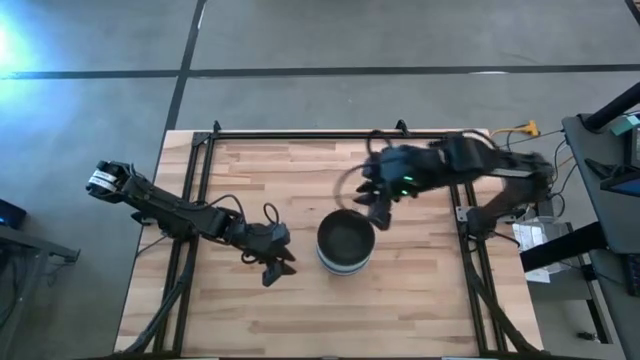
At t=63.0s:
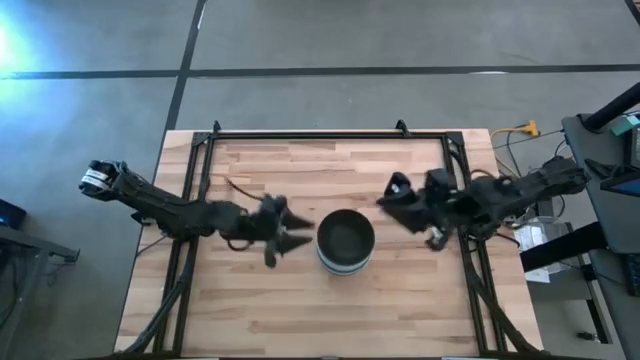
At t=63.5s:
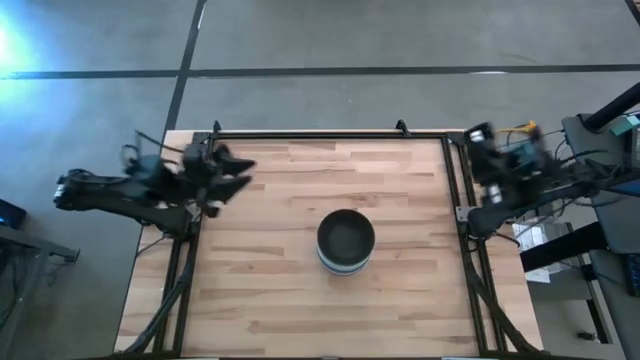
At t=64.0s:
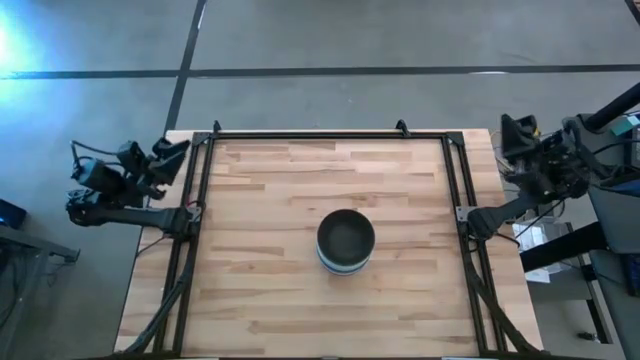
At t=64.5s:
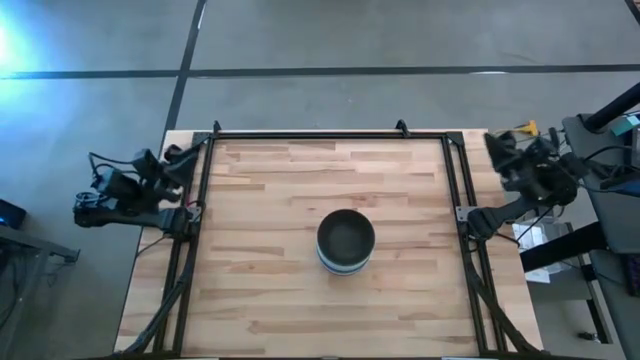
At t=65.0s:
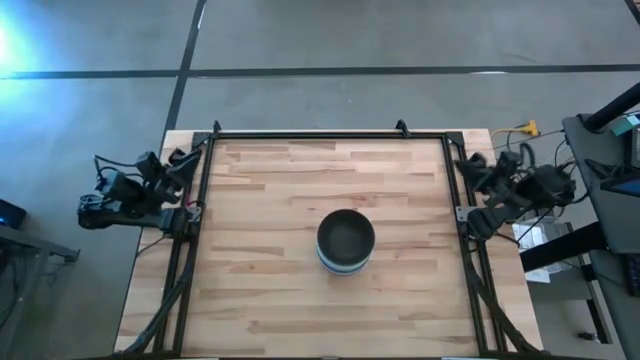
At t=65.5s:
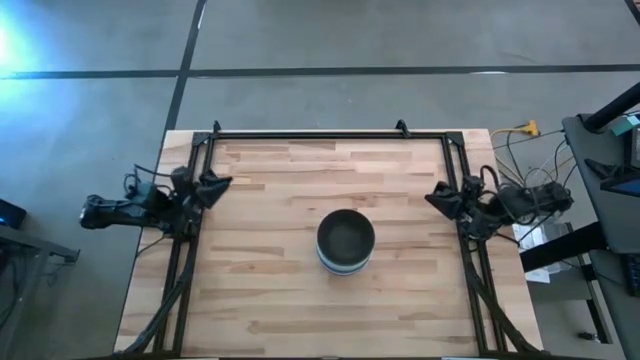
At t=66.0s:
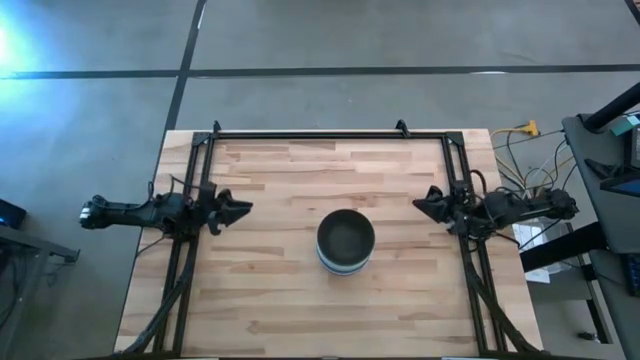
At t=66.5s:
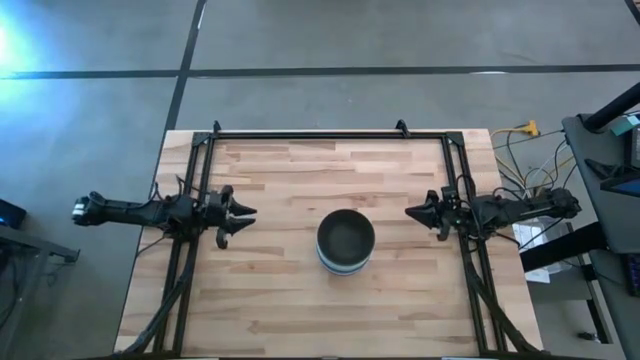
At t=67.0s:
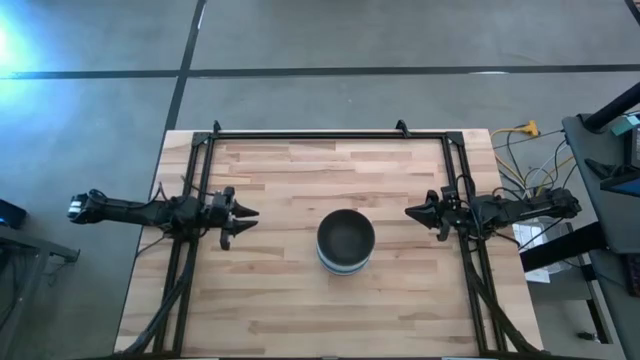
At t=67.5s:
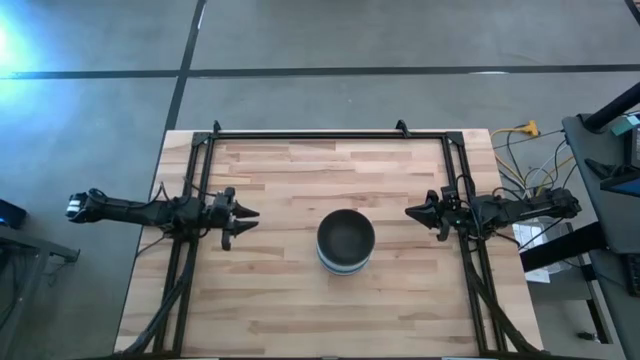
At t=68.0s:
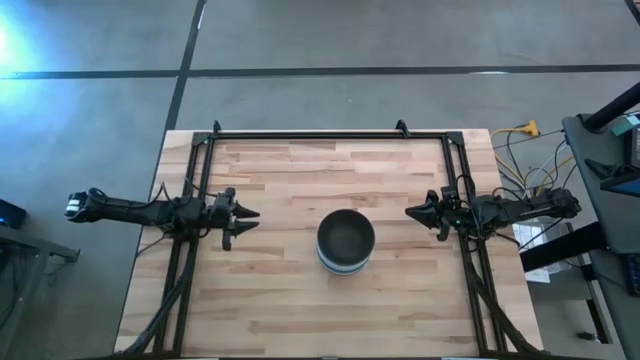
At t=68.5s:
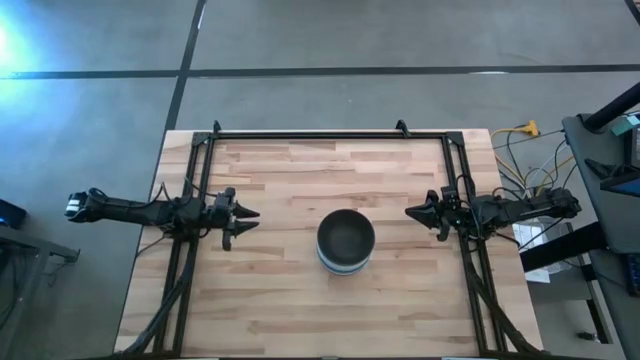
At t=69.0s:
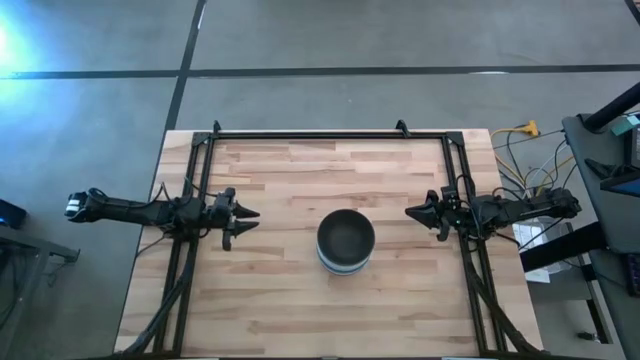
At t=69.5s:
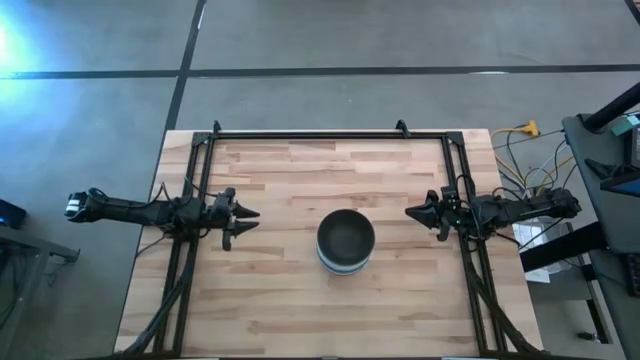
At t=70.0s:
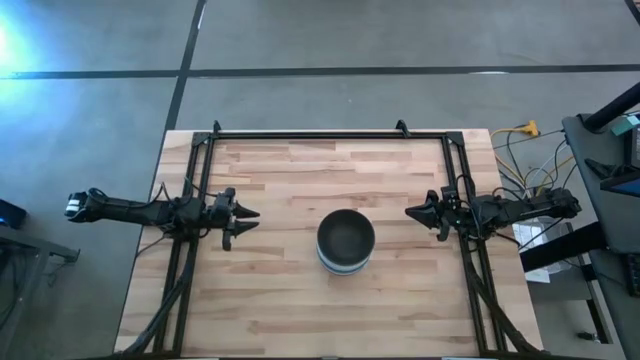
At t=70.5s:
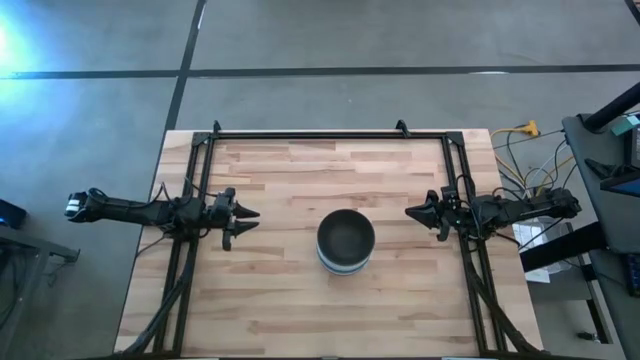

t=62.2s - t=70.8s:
Task: Nest bowls inside each other
Return to Home Position

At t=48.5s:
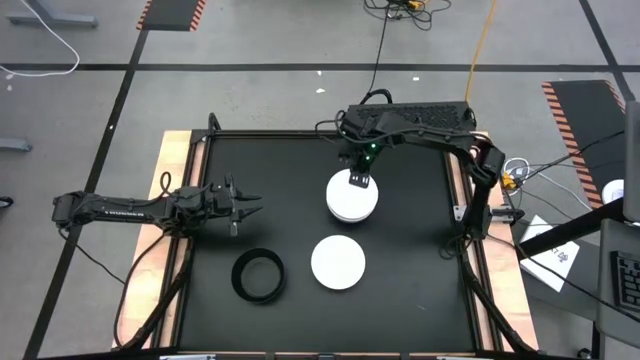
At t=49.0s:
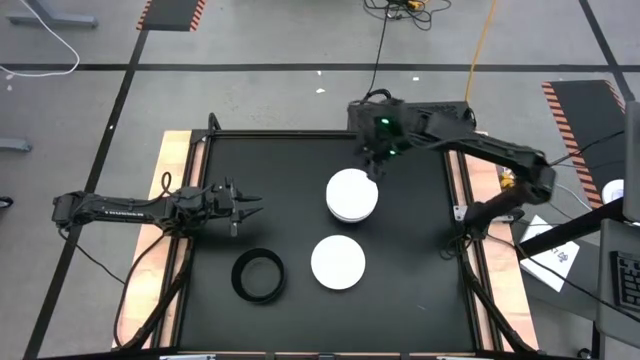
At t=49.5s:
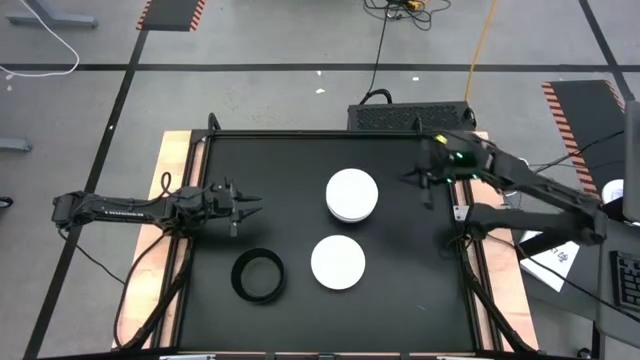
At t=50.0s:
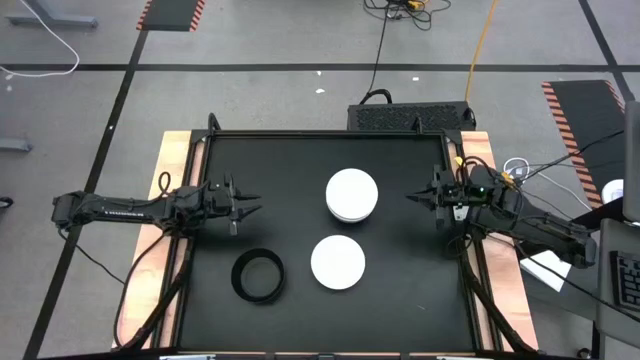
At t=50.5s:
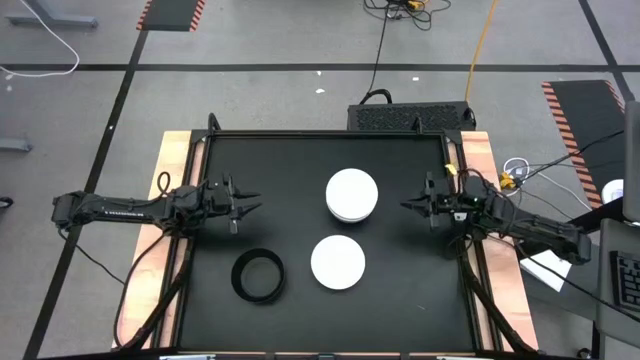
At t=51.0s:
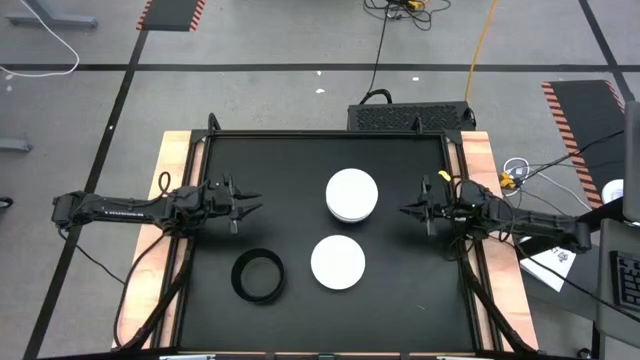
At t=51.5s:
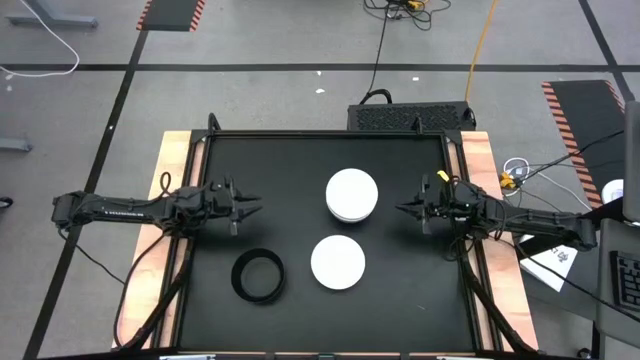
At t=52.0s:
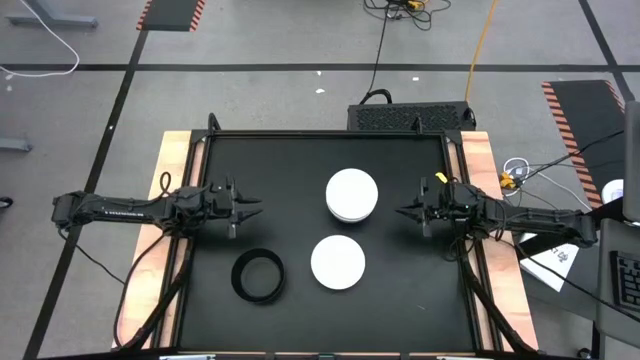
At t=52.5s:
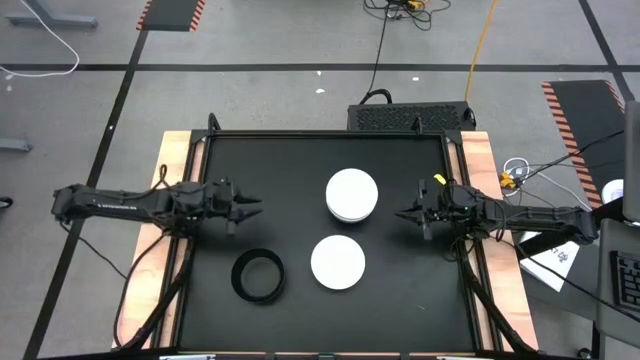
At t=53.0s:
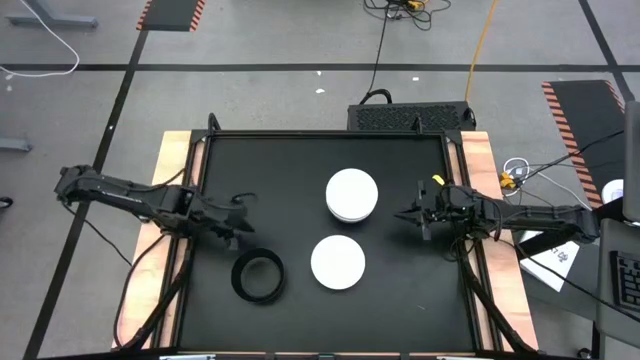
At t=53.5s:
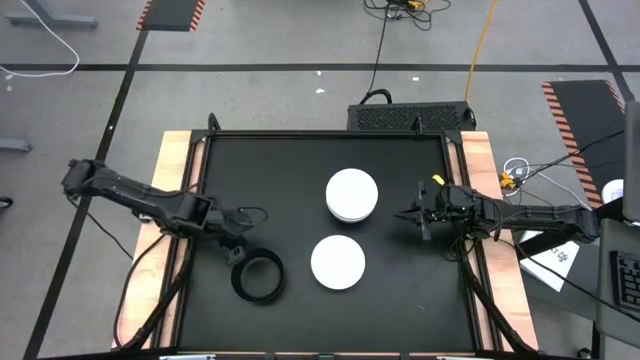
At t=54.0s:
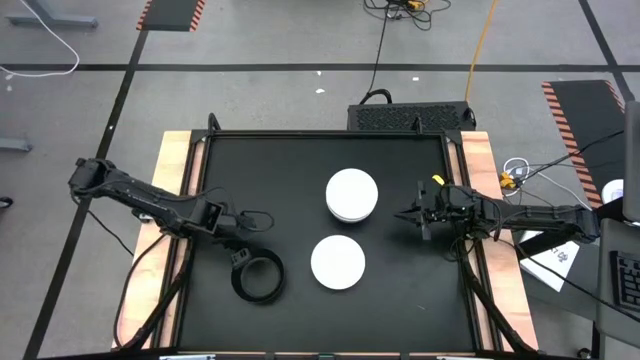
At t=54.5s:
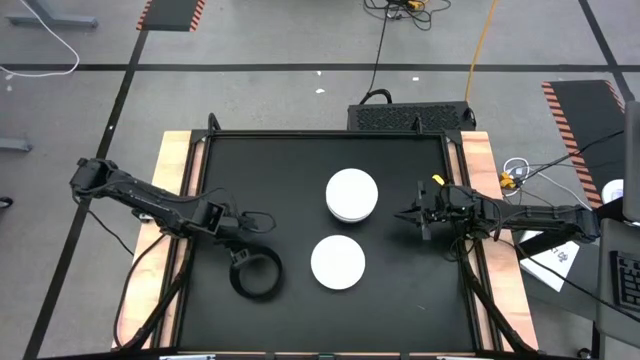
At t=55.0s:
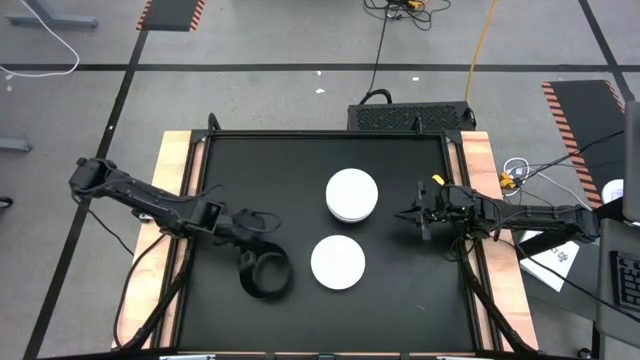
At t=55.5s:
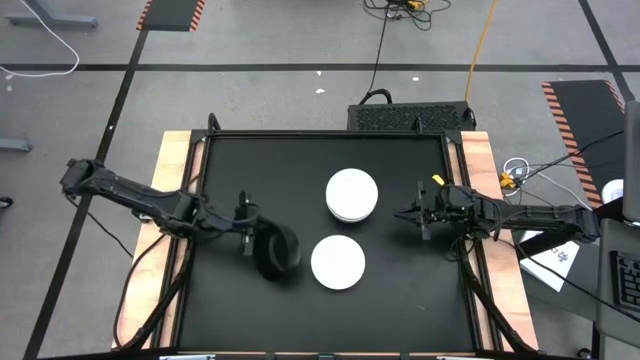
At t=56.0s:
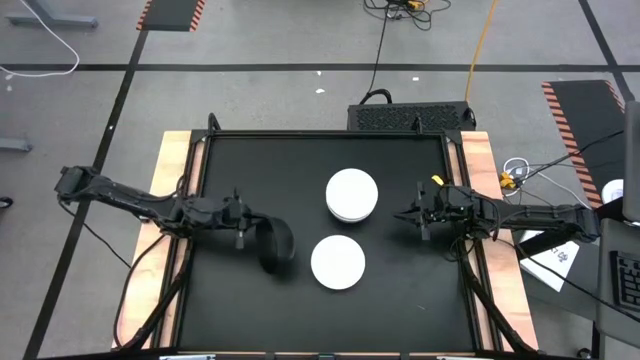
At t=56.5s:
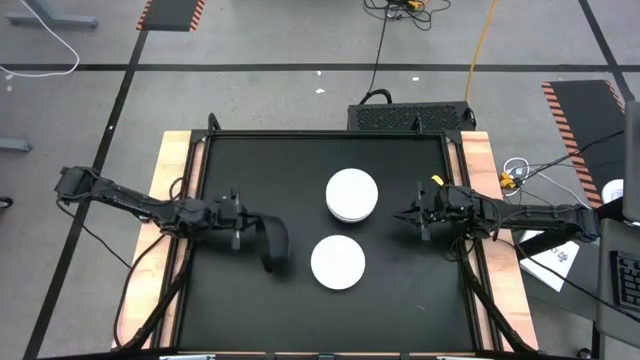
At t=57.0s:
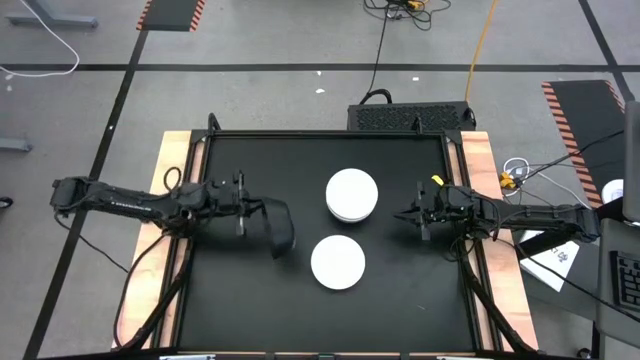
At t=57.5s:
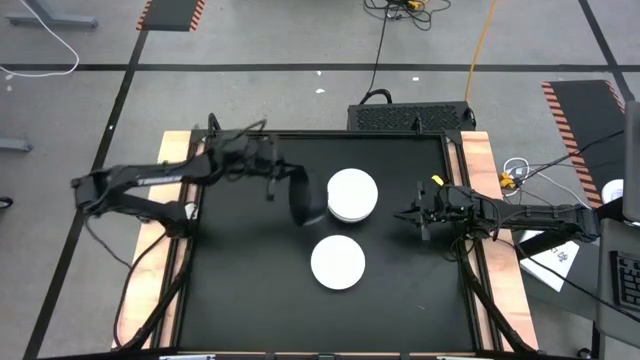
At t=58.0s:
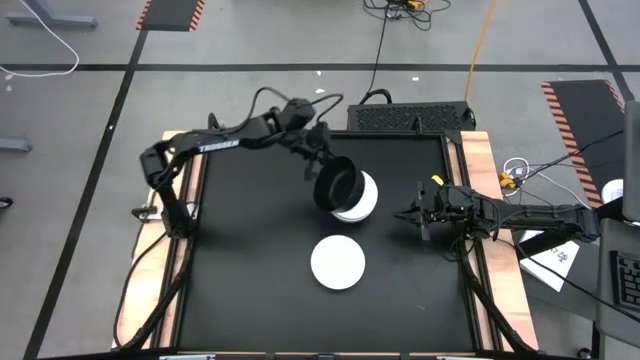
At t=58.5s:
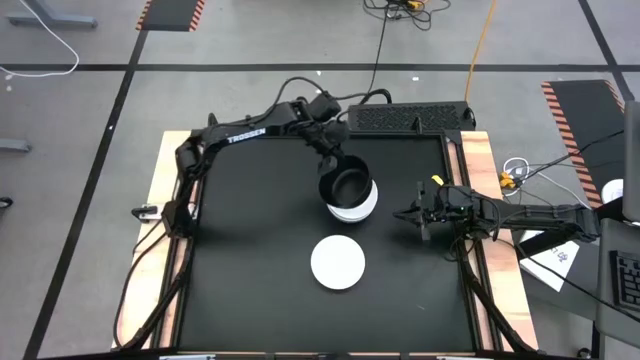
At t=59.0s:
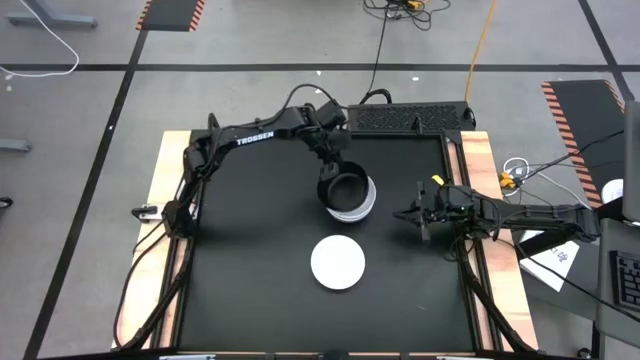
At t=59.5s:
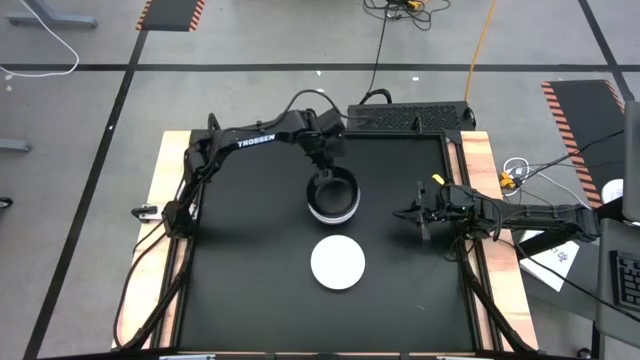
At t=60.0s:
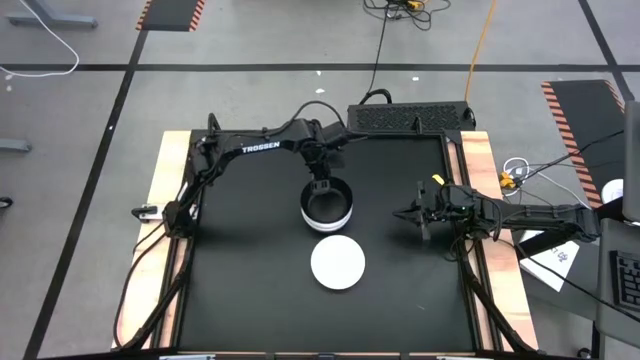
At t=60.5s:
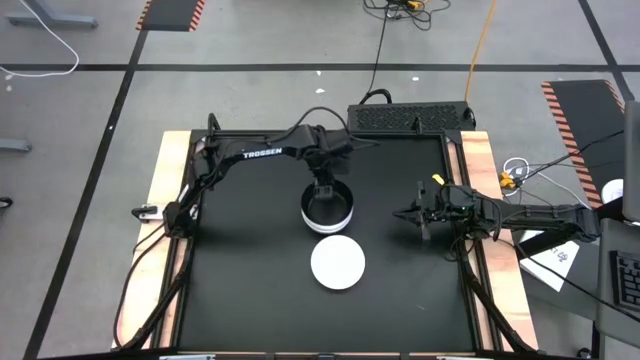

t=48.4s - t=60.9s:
Task: Nest bowls inside each other
Stack the black bowl on top of the top white bowl

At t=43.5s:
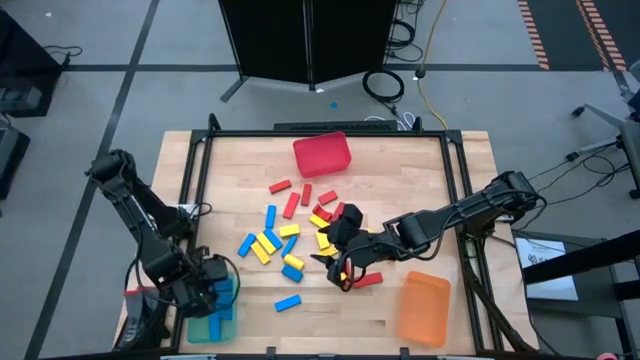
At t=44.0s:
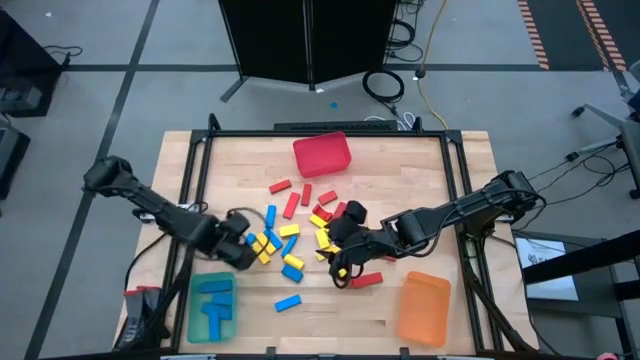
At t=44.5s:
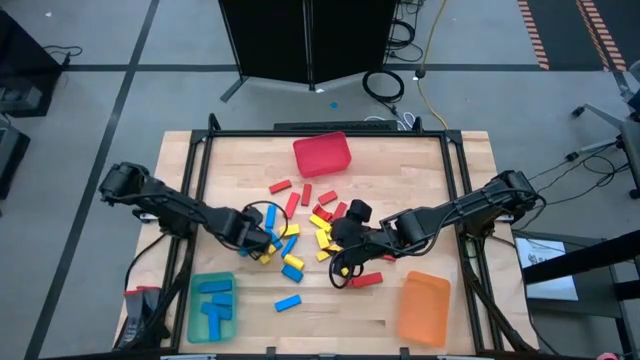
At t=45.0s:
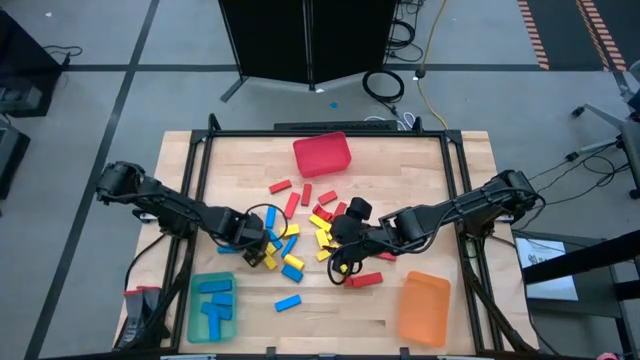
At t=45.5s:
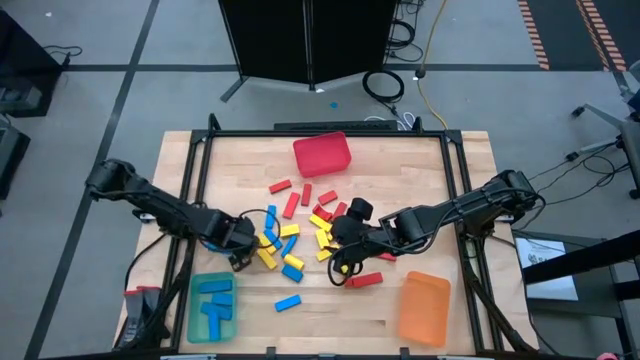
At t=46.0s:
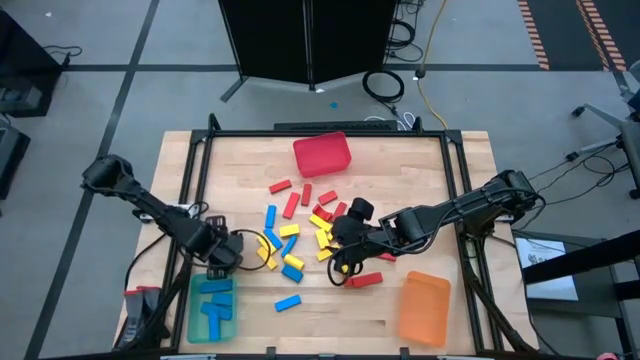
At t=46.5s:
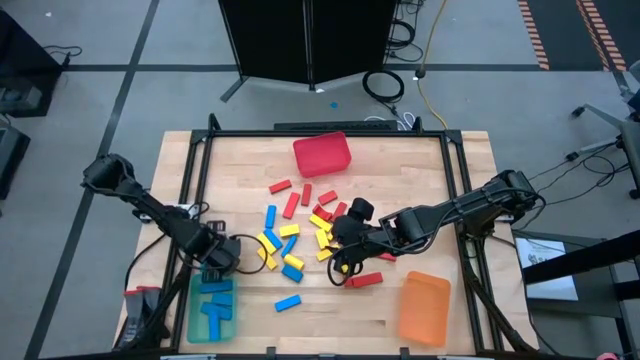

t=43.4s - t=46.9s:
Task: Sort blocks
Put the blue block into the green bin
